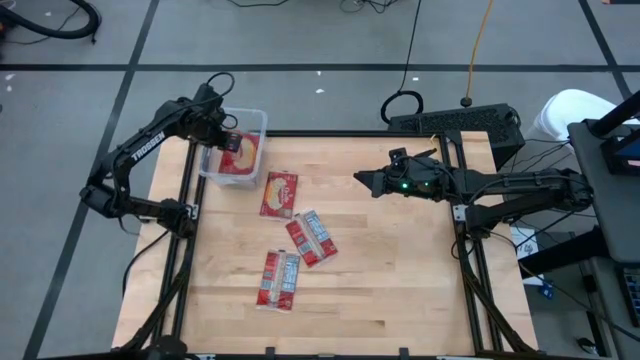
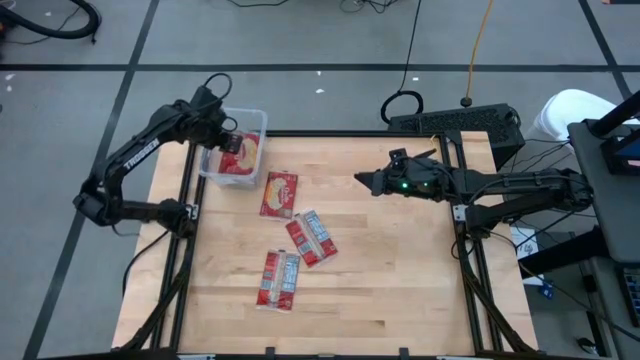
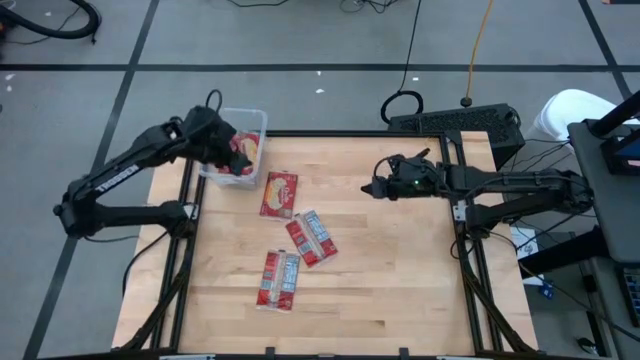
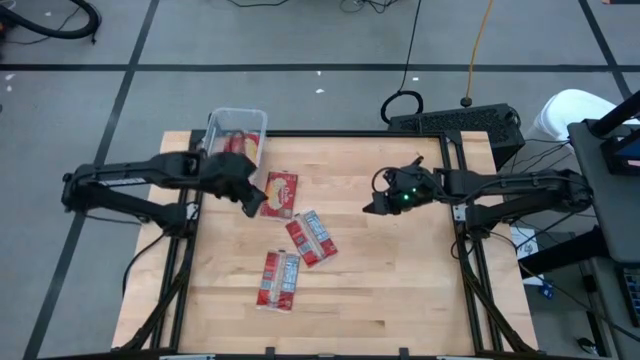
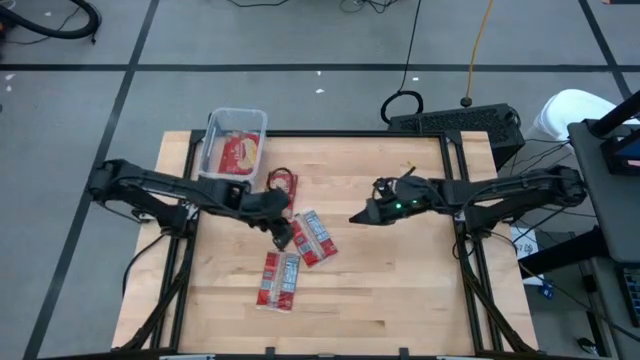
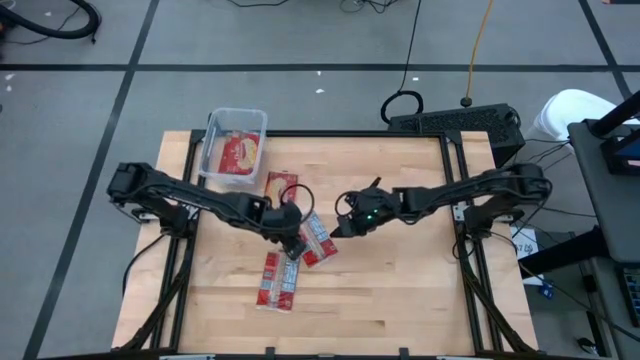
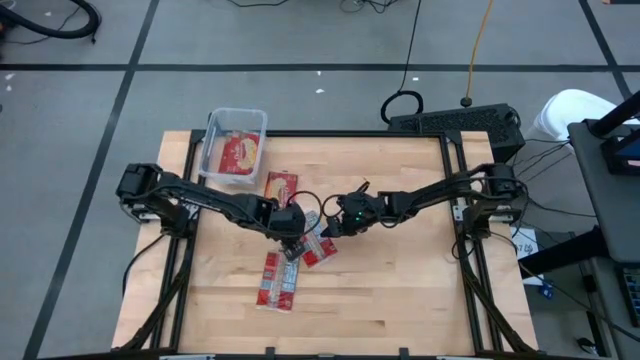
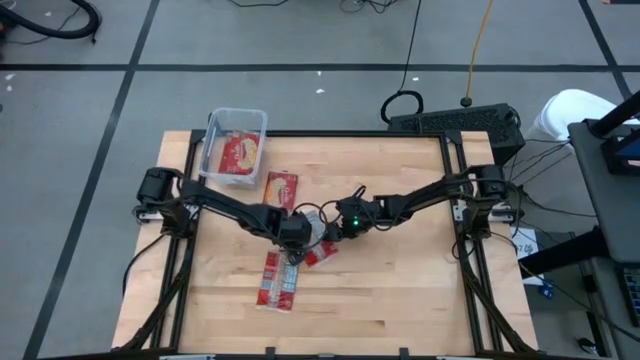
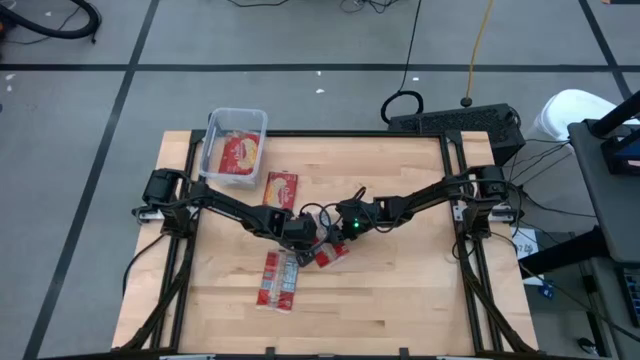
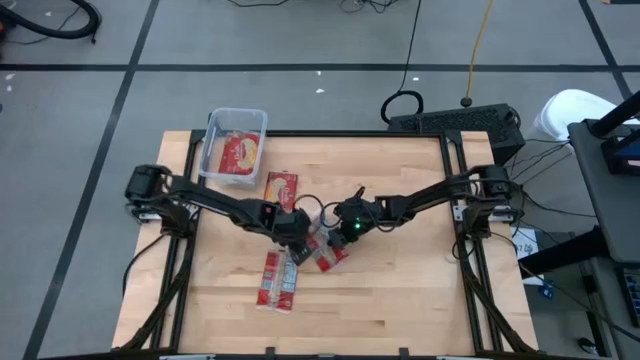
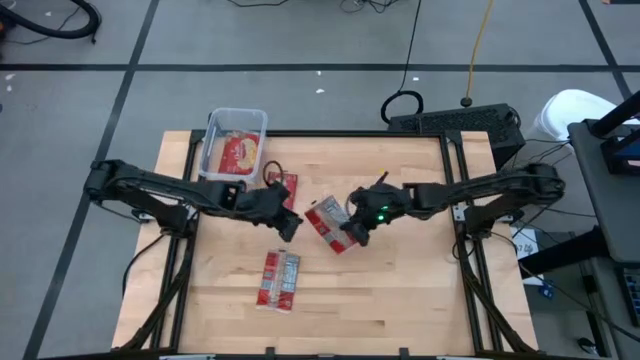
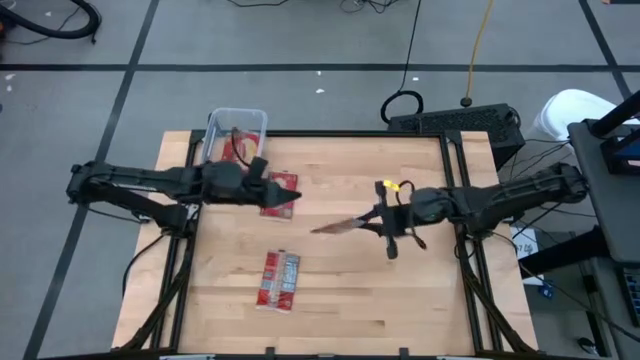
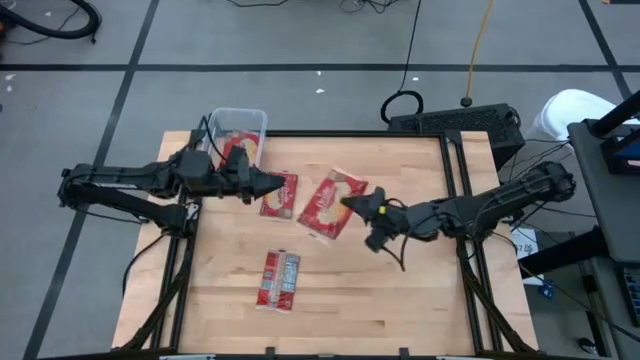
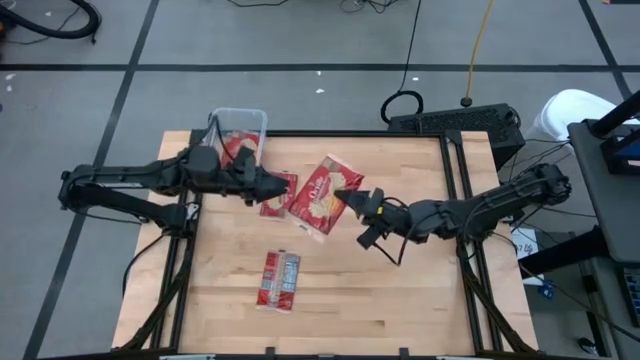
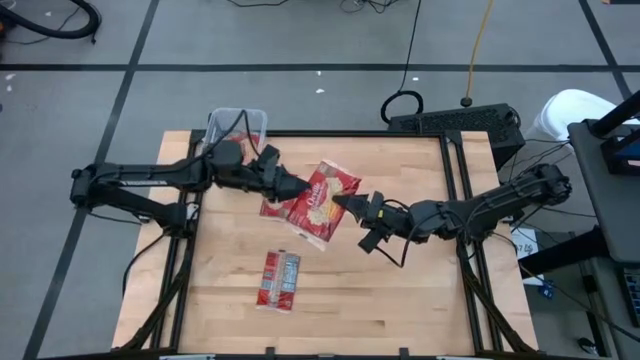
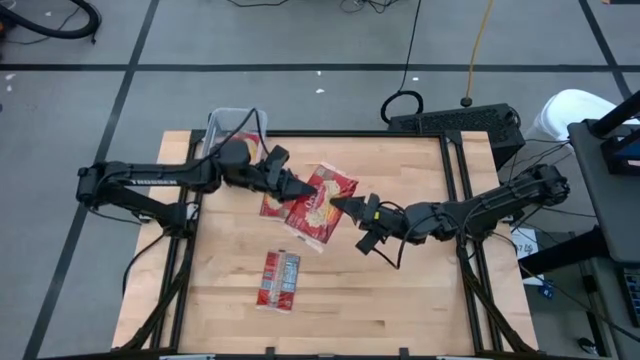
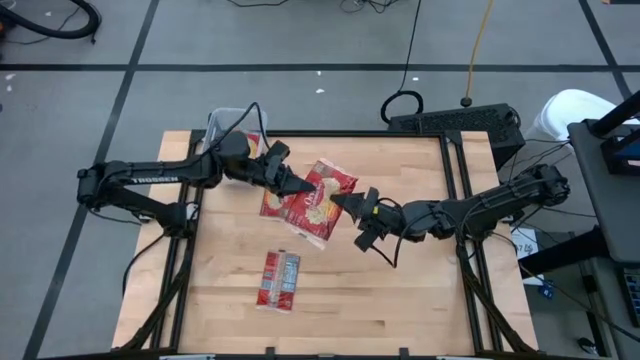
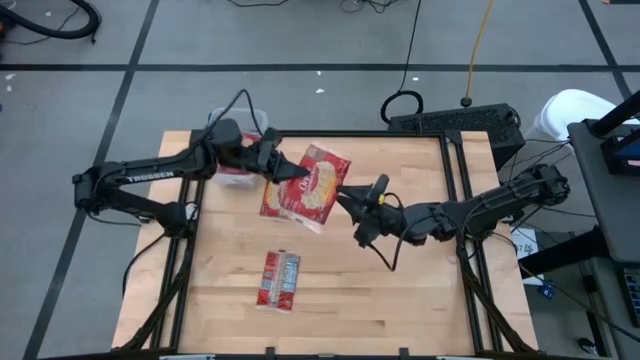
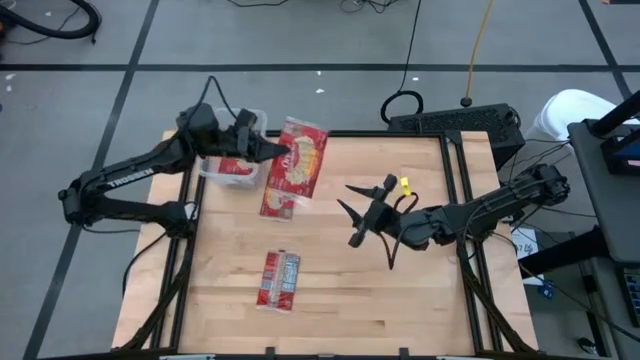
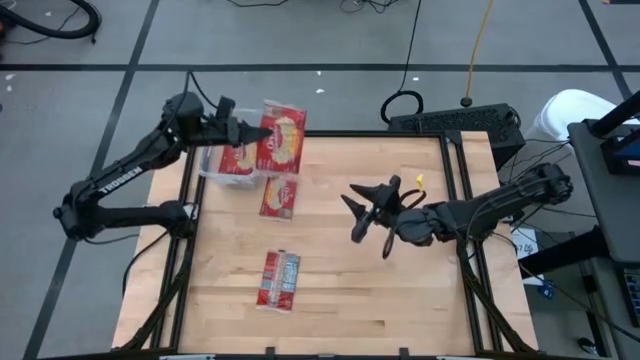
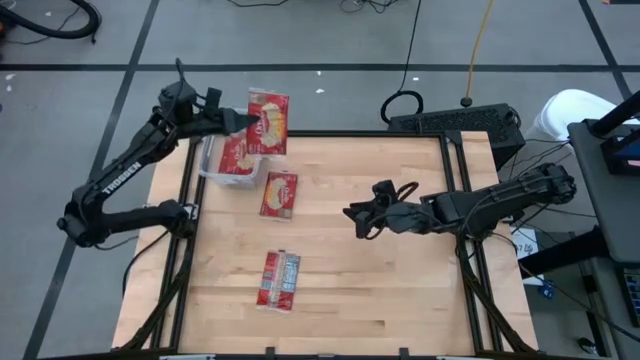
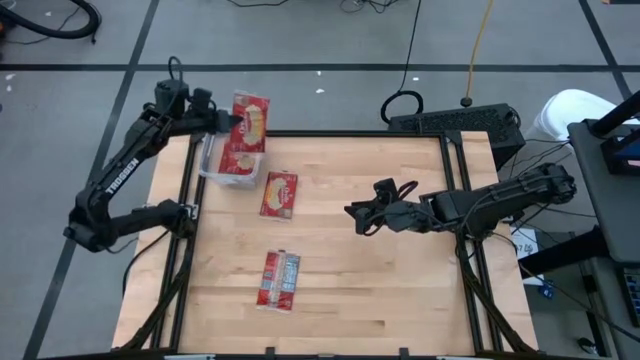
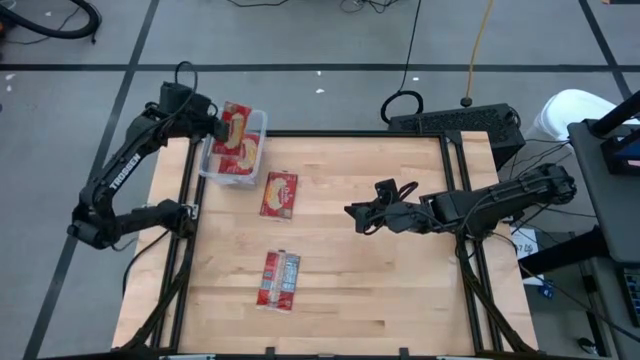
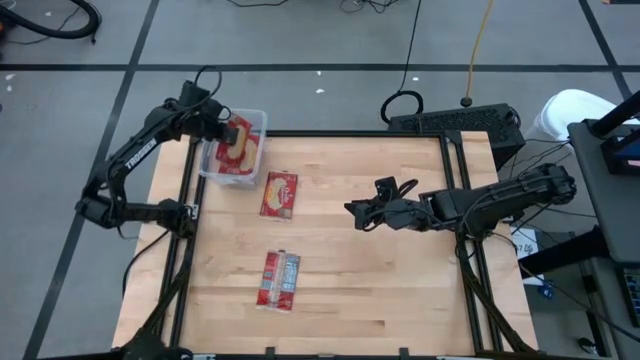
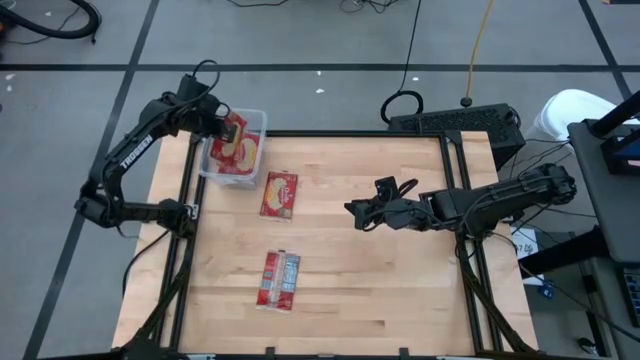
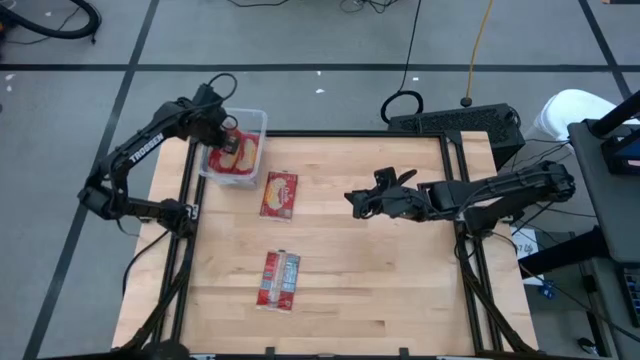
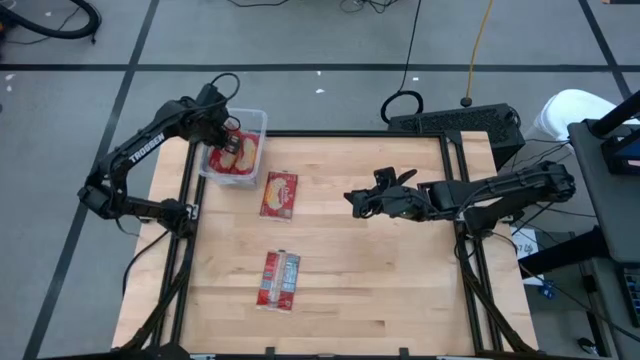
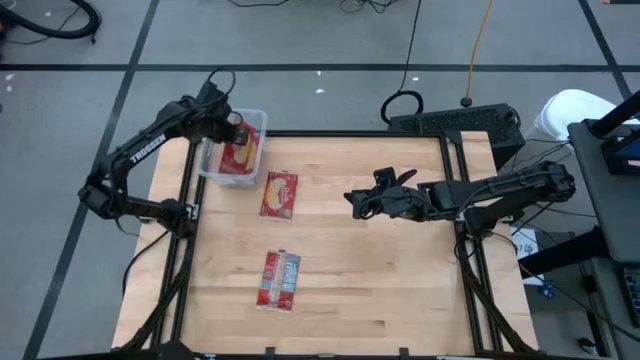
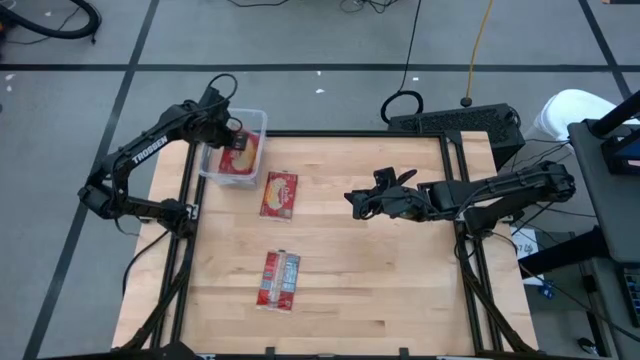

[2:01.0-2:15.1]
Task: Sort popcorn bags into baskets
Put the red popcorn bag into the transparent container

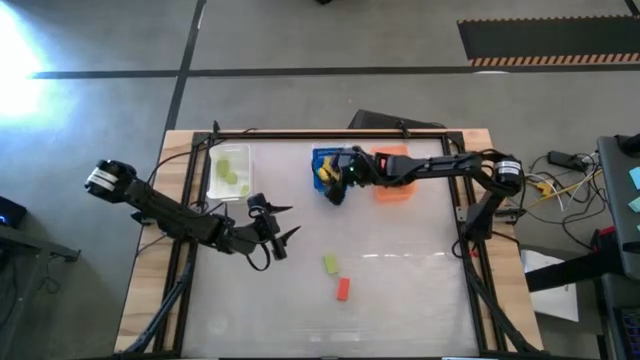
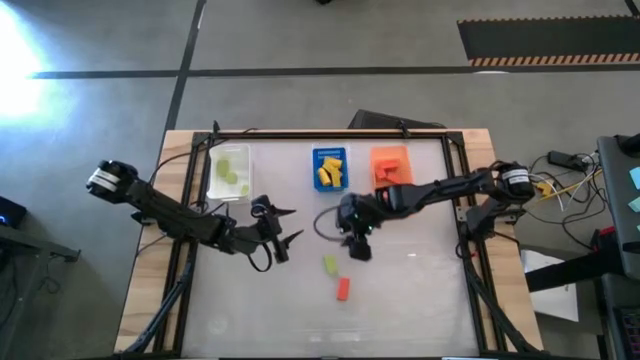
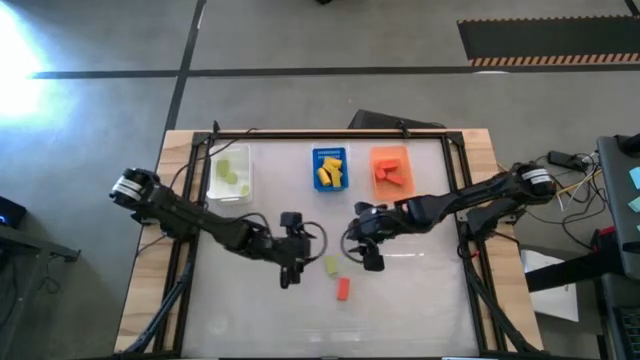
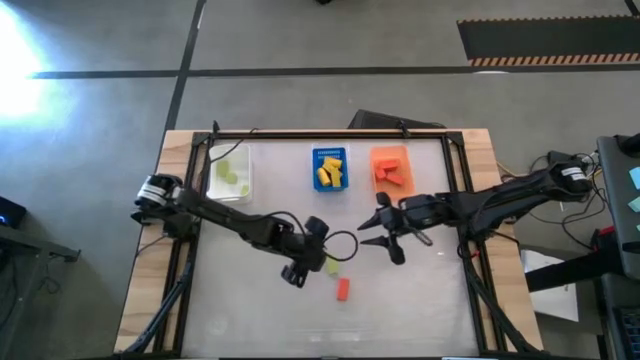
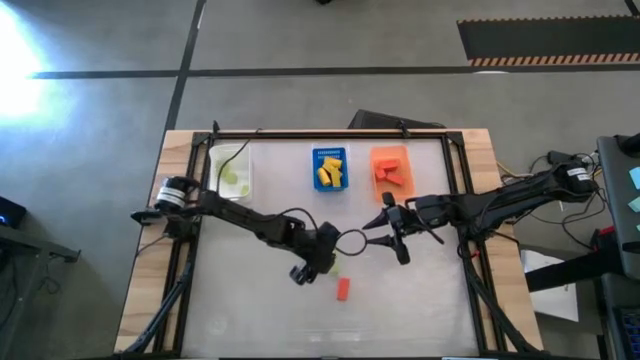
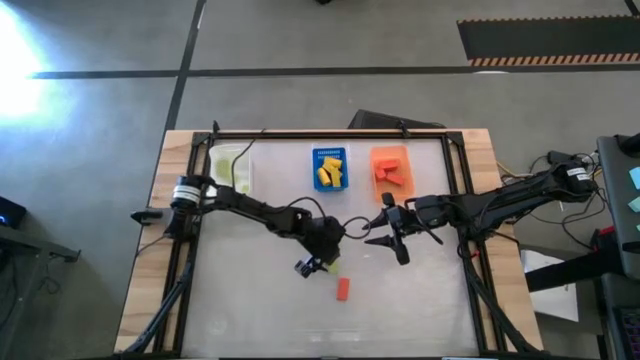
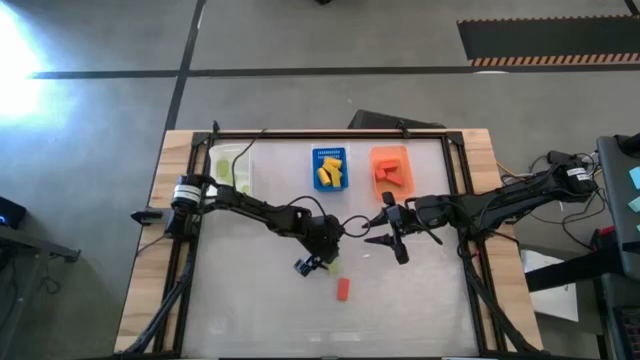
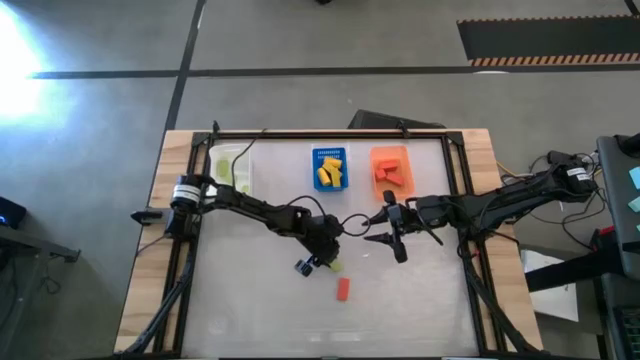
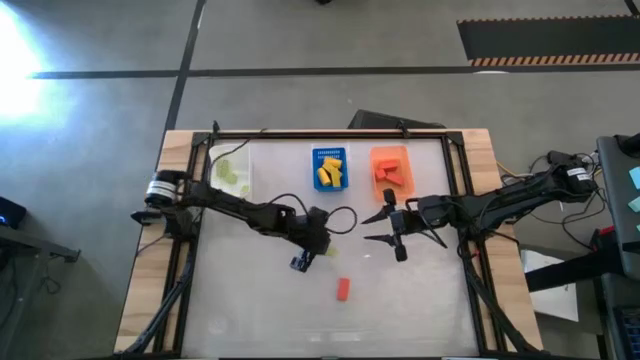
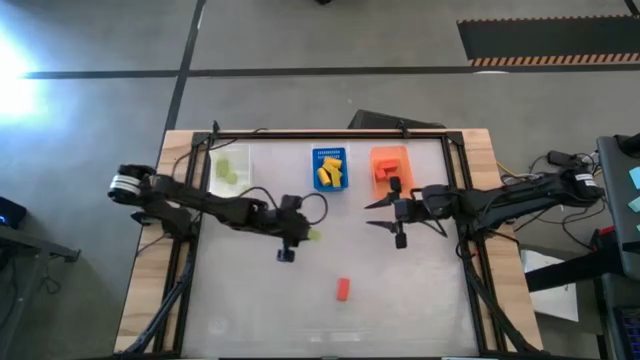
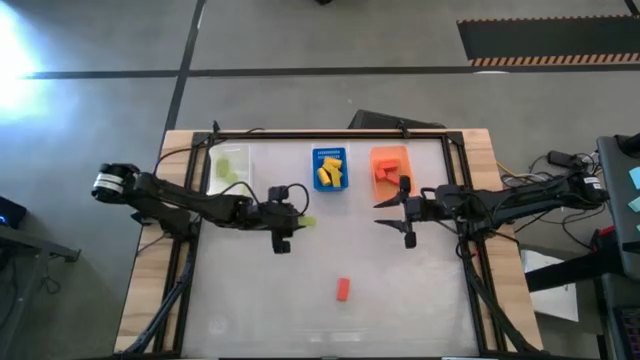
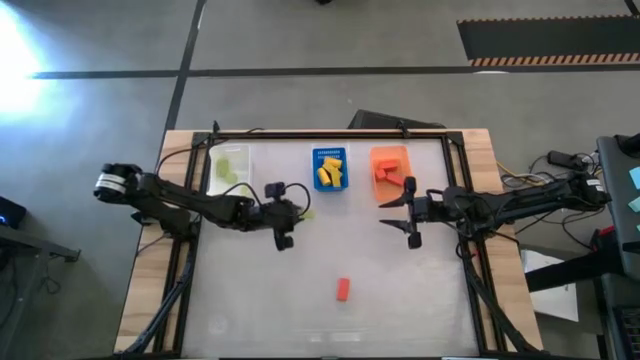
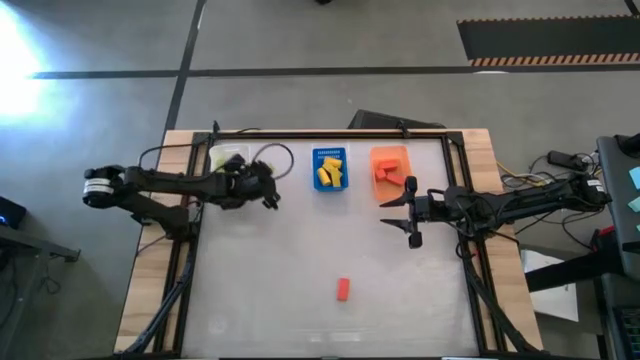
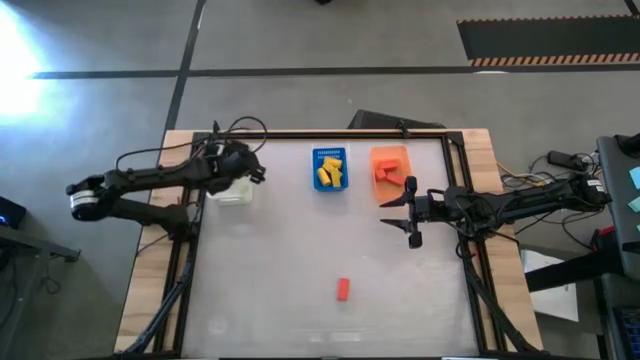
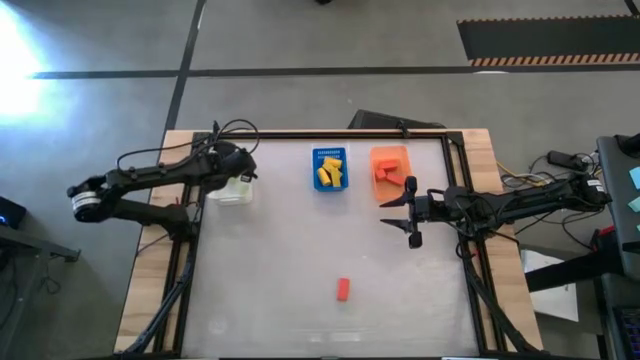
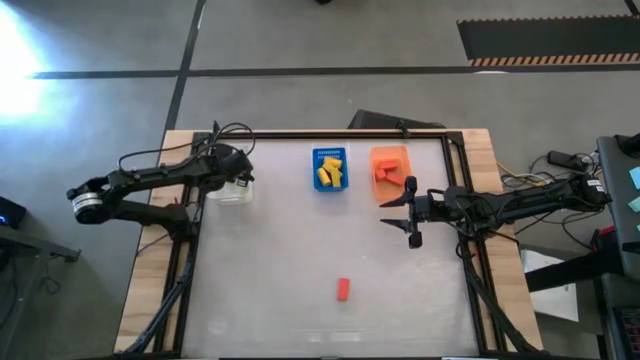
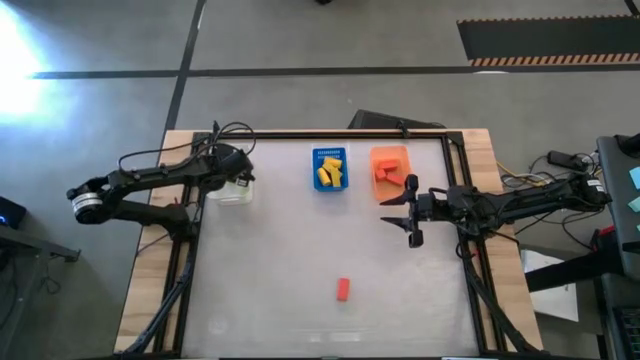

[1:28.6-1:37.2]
Task: Sort & place blocks by color
Put the green block into the white bin
